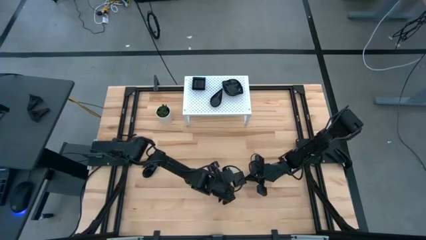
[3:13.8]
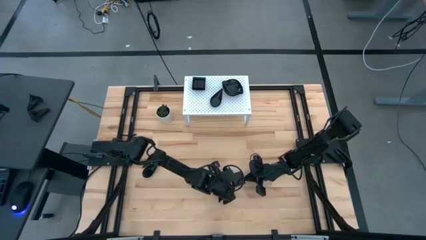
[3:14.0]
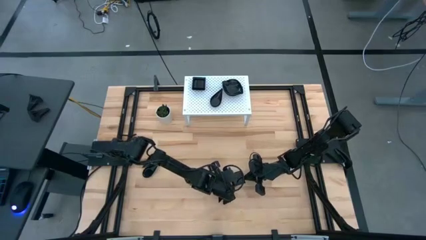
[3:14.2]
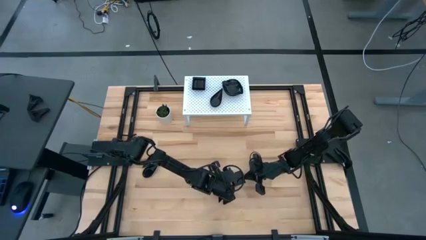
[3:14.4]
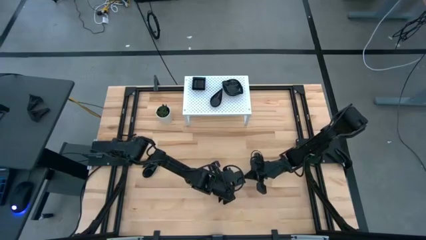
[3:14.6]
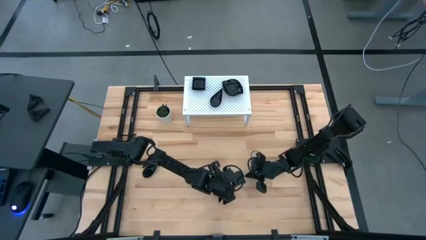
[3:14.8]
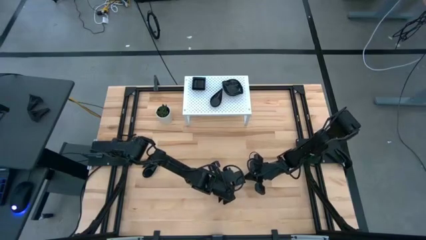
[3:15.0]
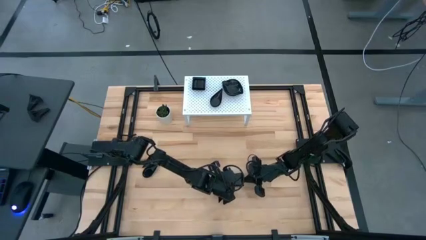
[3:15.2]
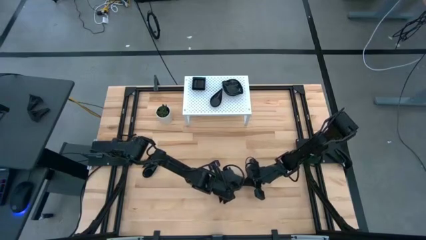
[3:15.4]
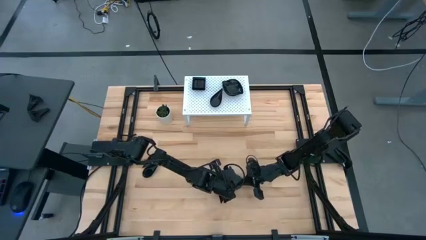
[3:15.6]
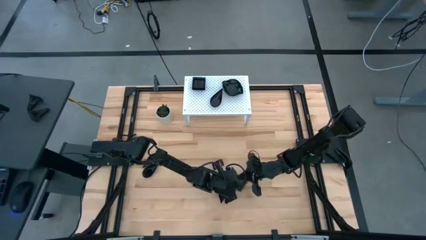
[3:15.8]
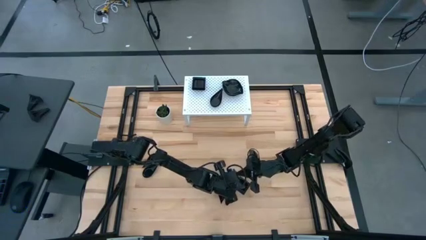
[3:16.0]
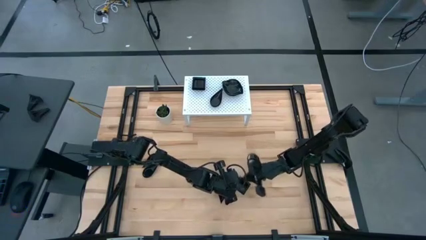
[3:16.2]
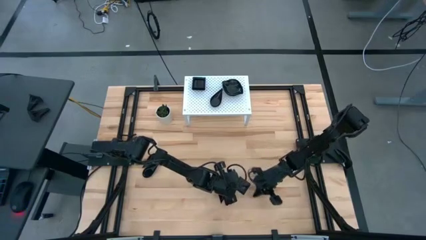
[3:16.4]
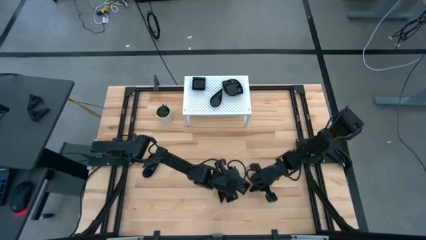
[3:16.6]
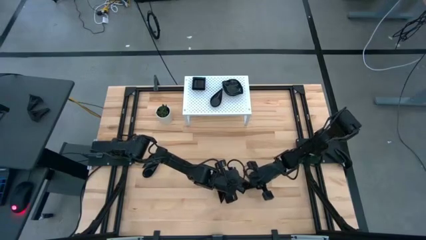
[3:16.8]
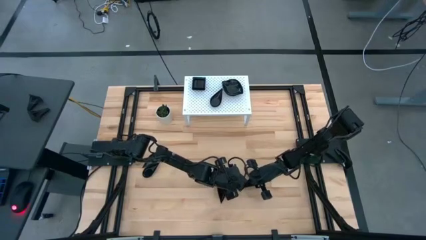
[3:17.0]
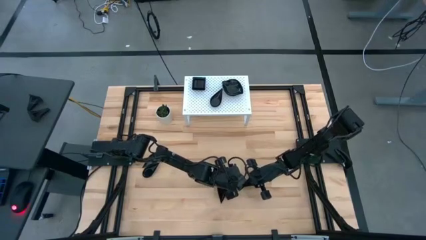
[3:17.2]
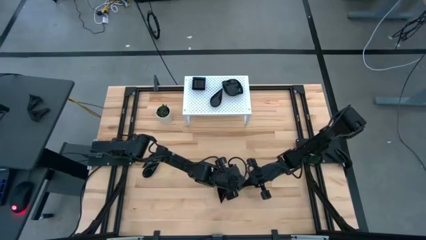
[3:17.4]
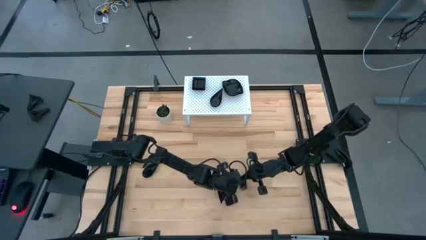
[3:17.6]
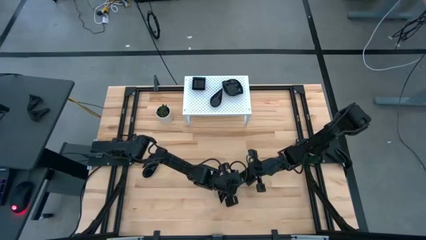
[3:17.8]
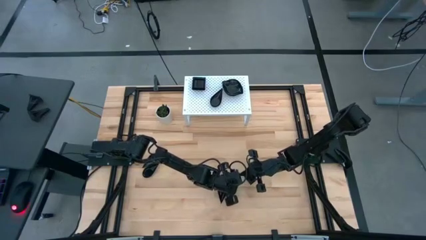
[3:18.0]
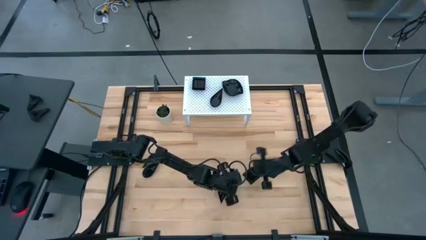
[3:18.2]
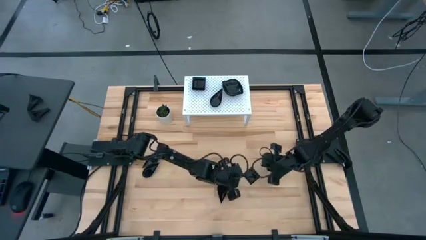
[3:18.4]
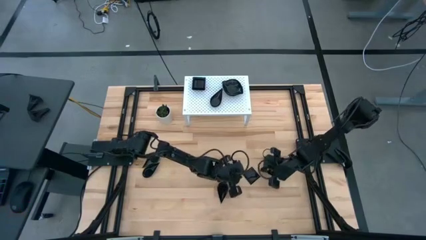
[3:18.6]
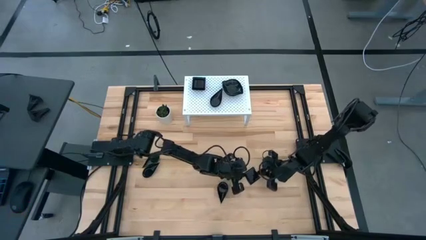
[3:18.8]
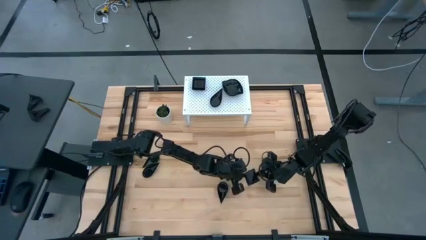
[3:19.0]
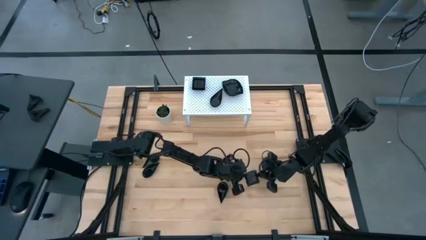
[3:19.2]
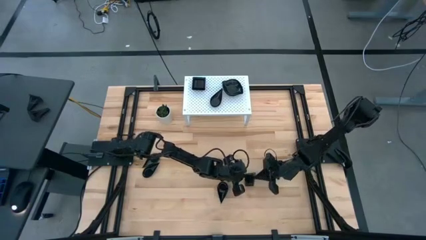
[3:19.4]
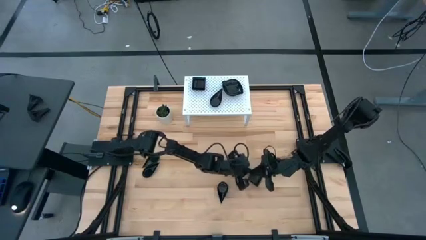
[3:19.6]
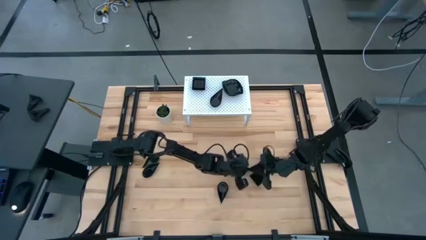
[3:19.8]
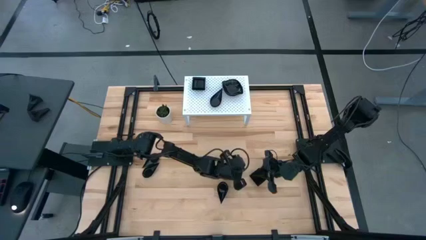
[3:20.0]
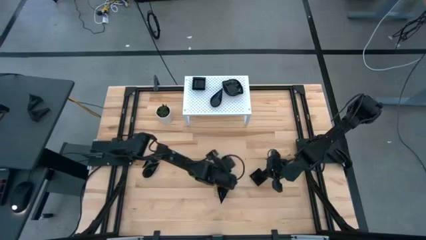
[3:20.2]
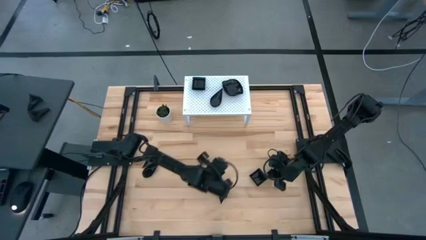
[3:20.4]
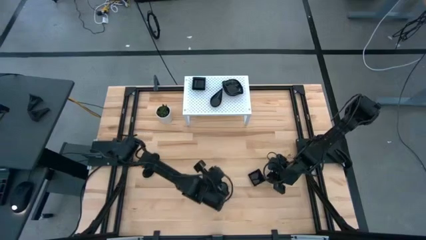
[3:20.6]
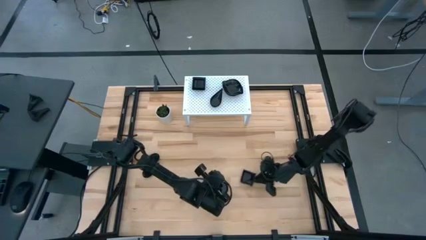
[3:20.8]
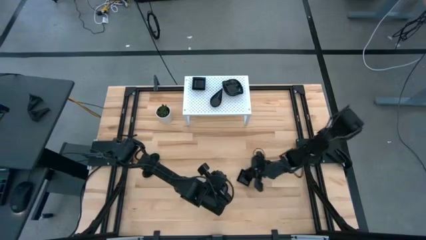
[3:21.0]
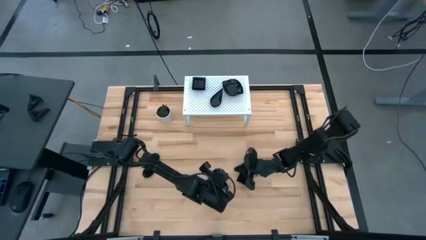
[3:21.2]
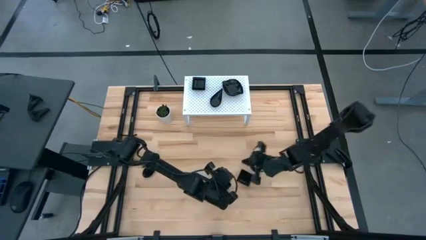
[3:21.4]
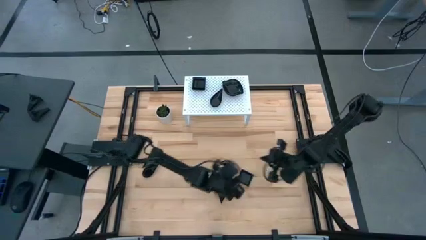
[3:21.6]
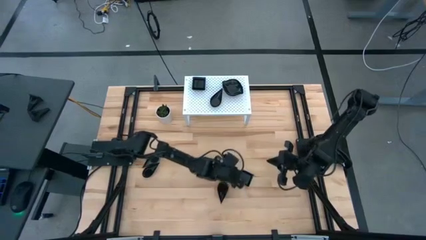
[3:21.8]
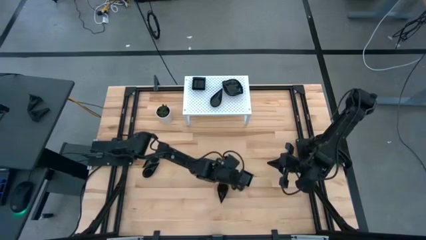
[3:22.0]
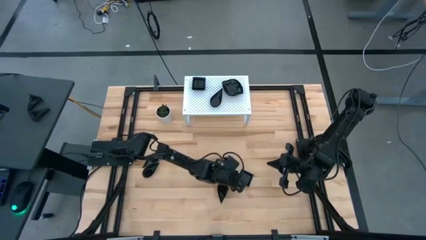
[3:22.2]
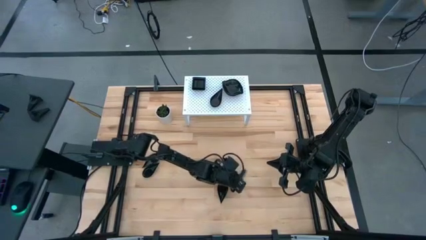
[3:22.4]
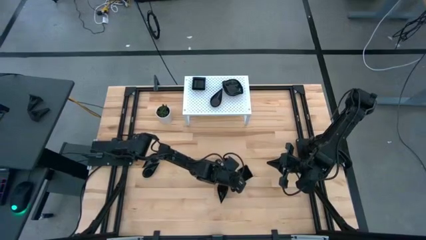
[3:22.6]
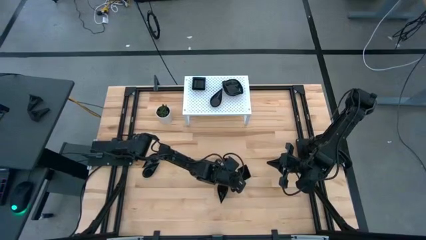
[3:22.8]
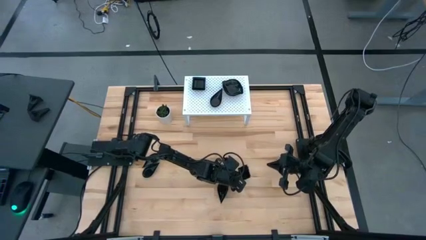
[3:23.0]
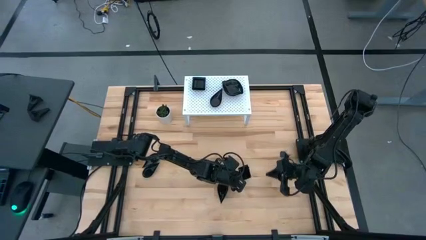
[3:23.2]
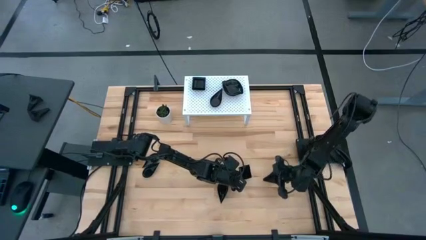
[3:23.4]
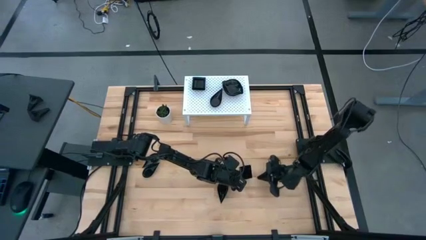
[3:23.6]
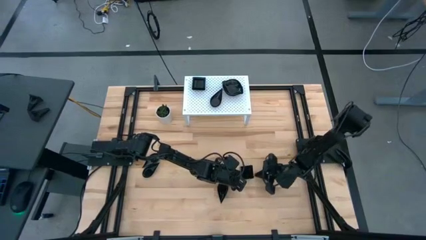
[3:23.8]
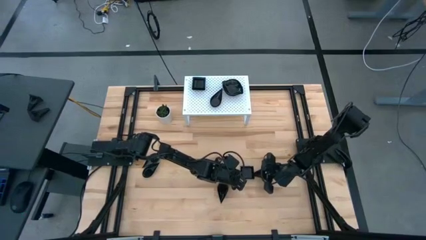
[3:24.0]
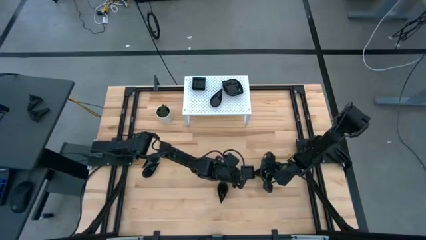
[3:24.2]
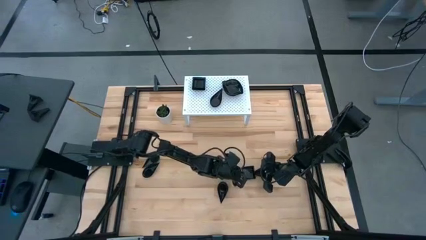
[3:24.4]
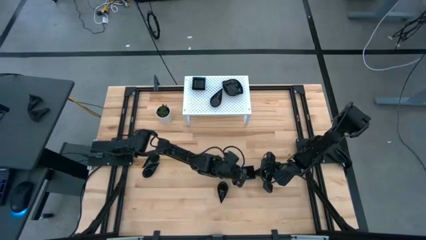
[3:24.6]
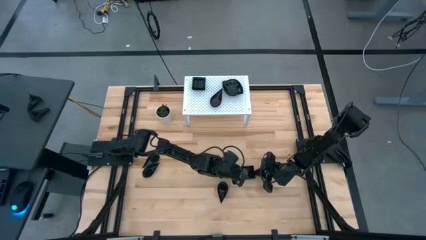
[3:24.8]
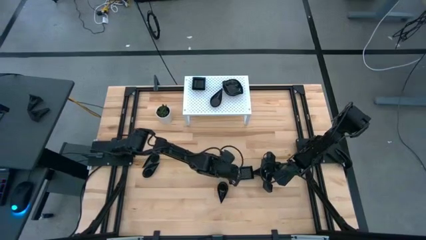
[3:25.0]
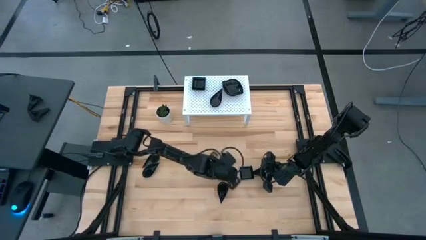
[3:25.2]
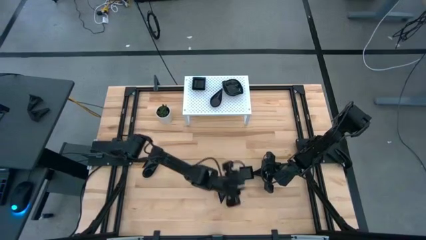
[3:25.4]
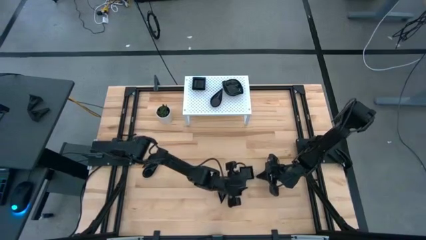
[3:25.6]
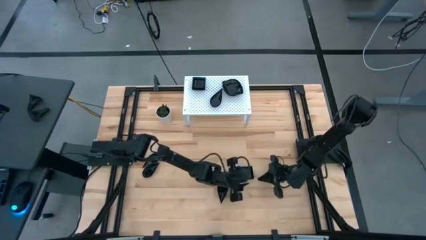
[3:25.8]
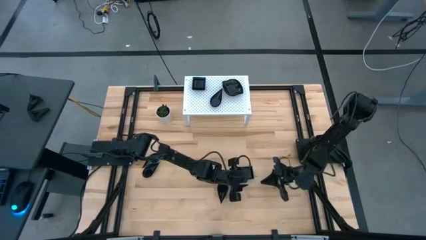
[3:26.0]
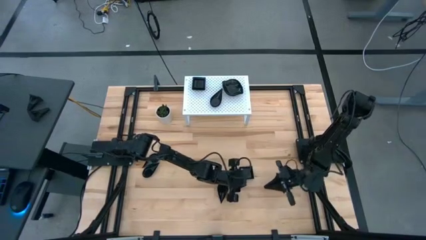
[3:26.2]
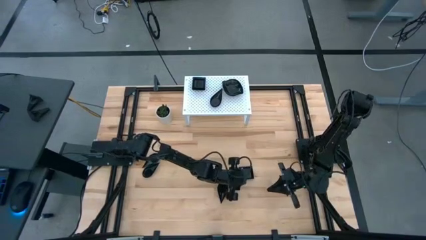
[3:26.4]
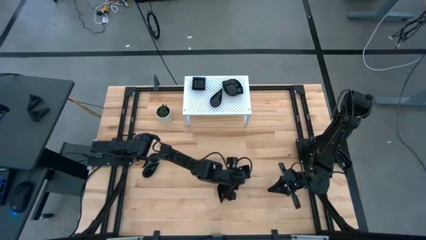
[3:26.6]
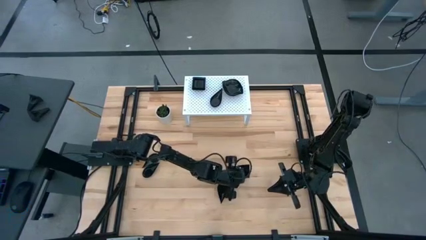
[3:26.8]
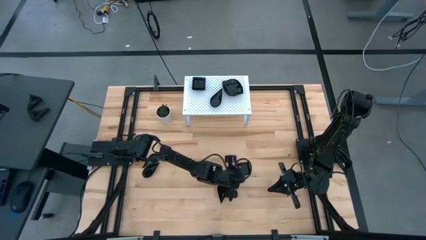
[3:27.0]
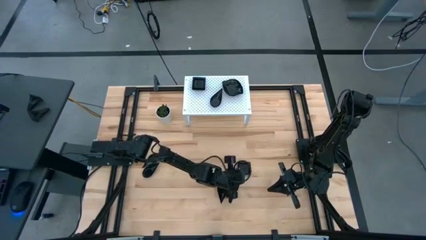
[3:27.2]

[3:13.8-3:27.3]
Task: Pick & Place Mini shaped plates
Stack the black plate on top of the black plate on the shelf

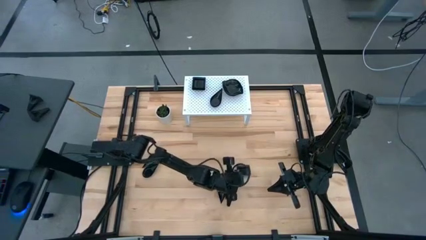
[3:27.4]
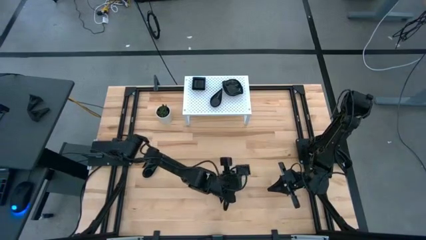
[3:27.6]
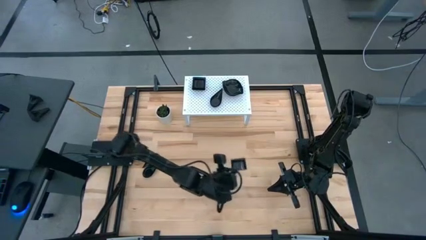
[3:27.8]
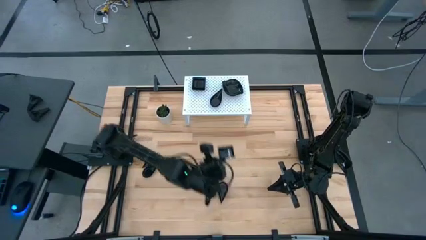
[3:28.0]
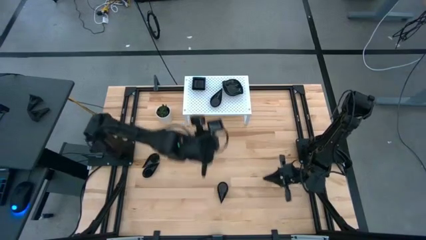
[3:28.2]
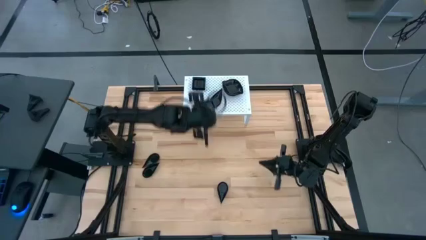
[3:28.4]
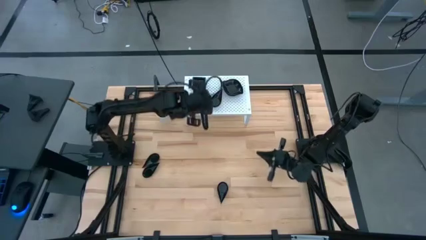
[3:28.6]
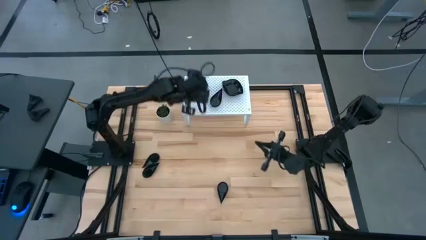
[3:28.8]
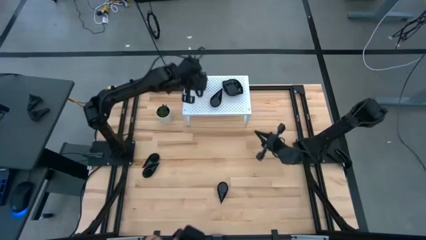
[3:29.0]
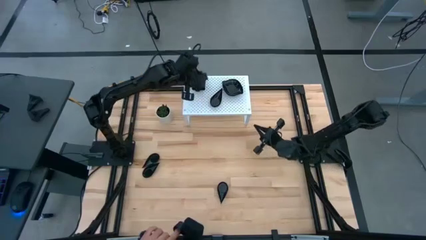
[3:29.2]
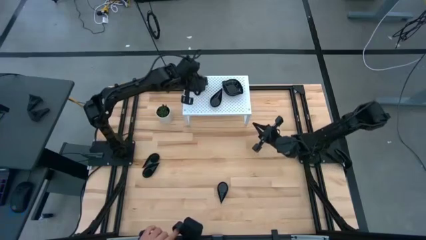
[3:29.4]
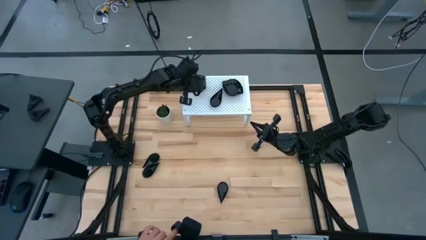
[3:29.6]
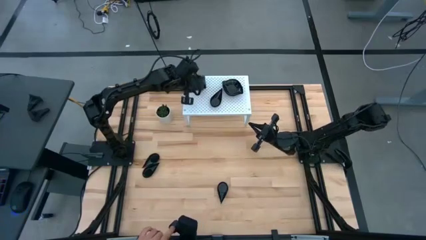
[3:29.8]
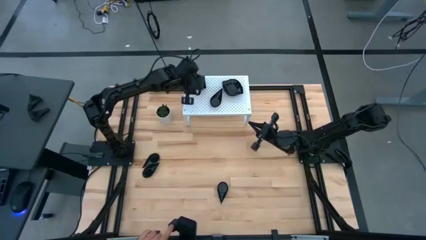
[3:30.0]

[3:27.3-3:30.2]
Stack the black plate on top of the black plate on the shelf

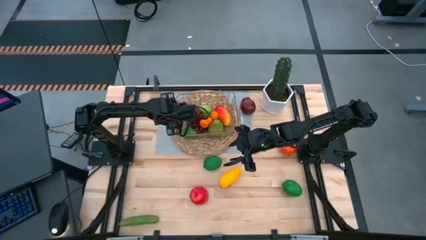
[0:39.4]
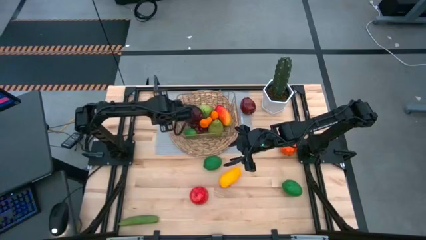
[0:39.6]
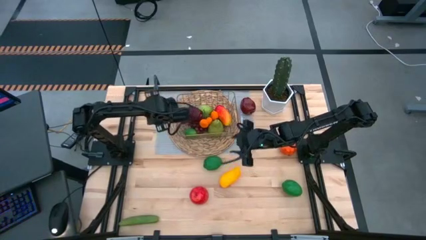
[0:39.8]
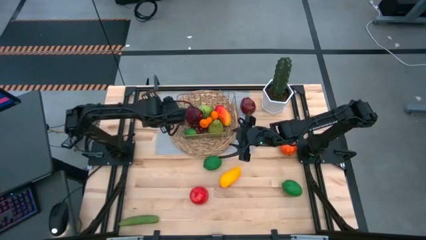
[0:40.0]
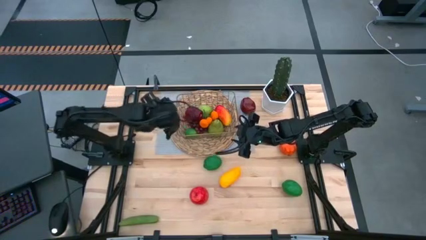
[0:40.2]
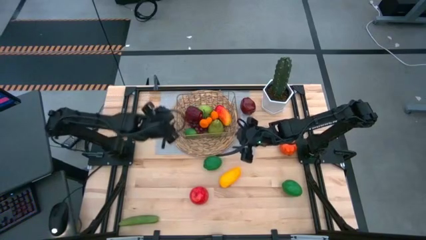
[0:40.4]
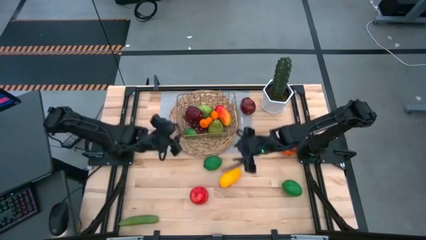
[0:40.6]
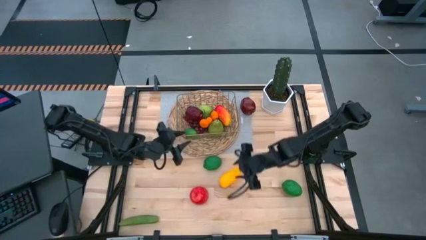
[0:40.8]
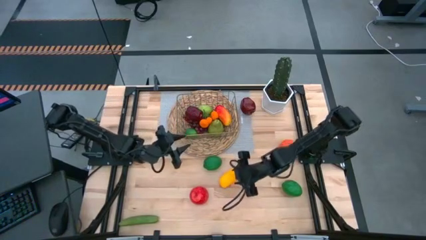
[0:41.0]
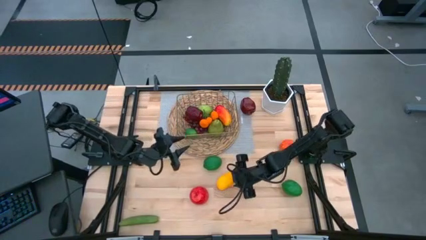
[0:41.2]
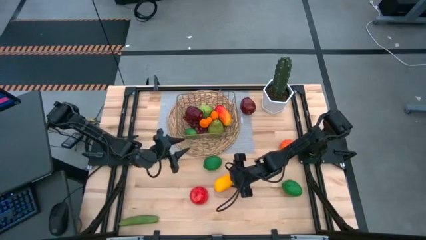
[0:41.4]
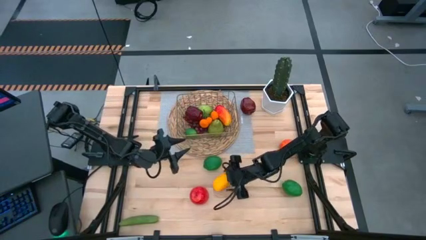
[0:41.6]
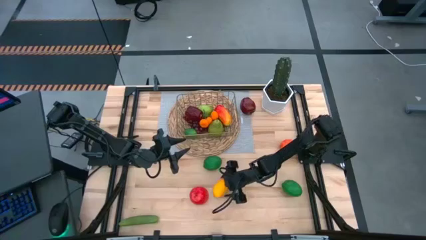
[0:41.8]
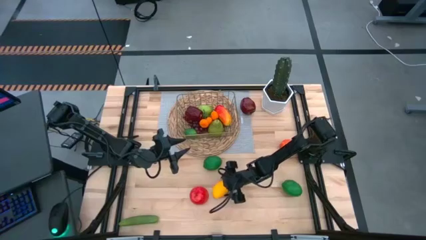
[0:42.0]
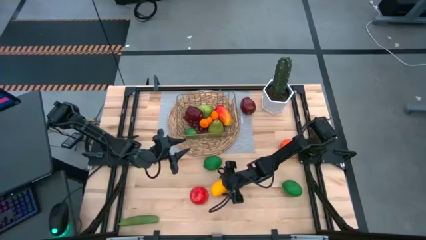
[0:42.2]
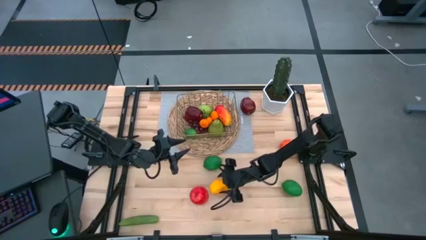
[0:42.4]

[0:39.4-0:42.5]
Task: Build produce basket
Put the yellow mango into the gold wire basket
